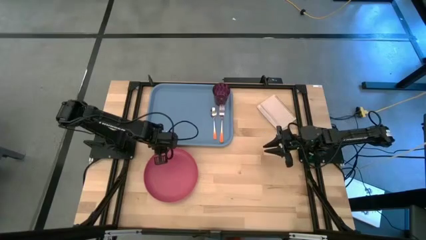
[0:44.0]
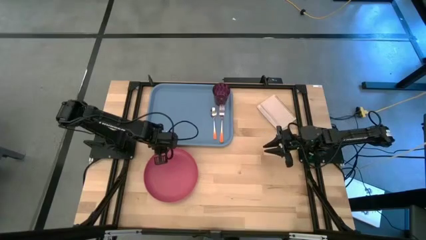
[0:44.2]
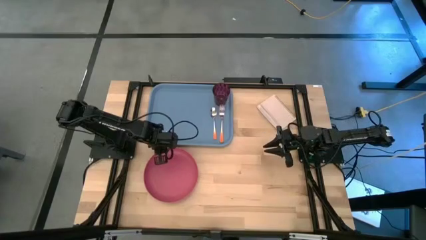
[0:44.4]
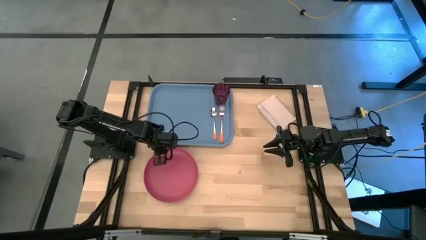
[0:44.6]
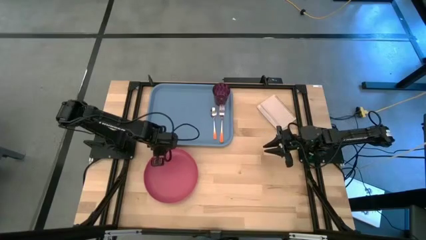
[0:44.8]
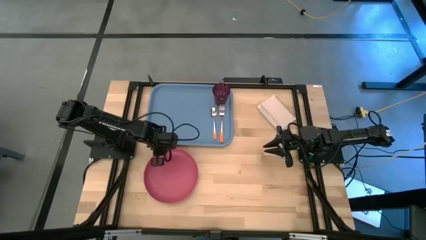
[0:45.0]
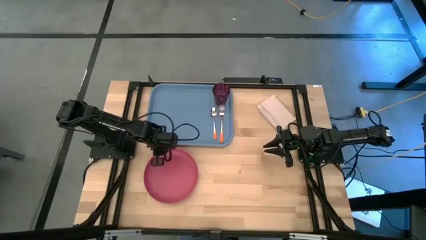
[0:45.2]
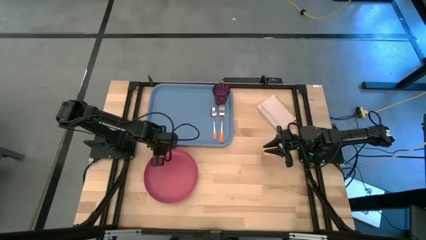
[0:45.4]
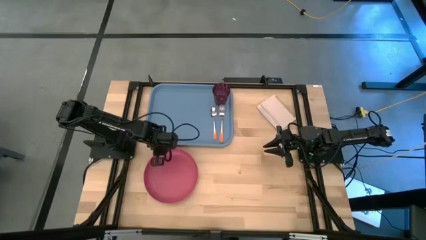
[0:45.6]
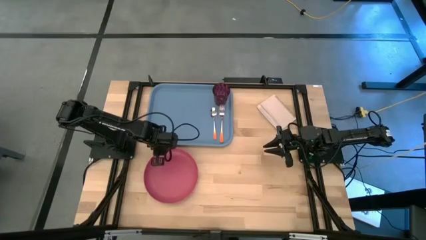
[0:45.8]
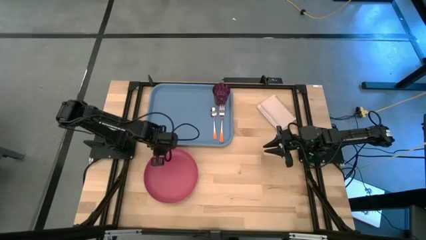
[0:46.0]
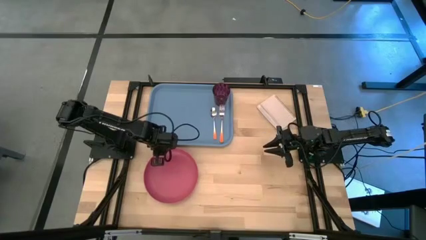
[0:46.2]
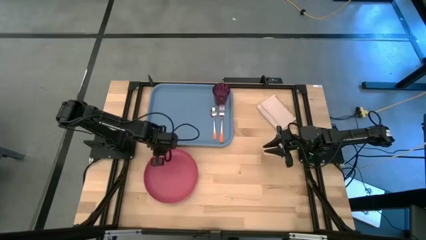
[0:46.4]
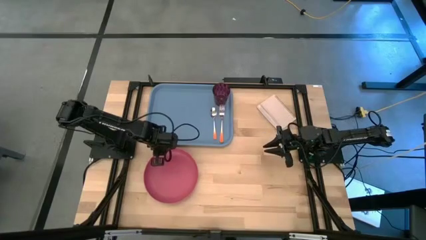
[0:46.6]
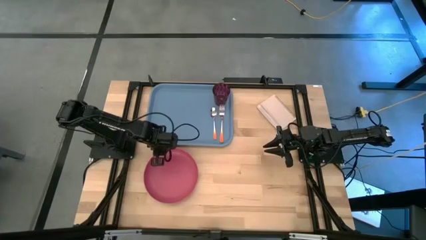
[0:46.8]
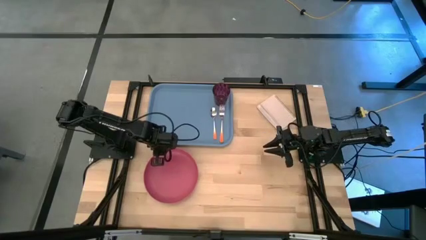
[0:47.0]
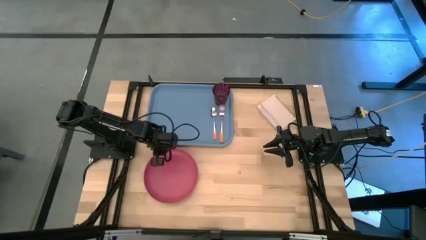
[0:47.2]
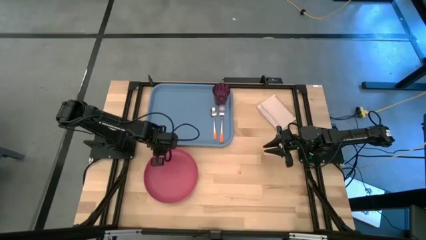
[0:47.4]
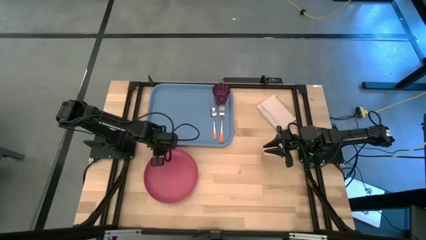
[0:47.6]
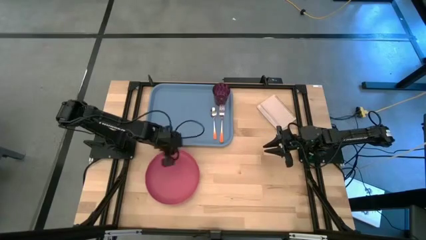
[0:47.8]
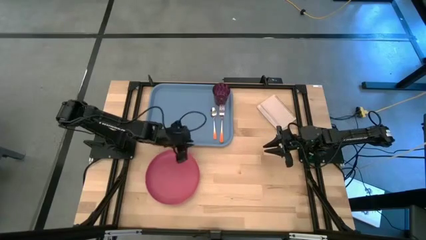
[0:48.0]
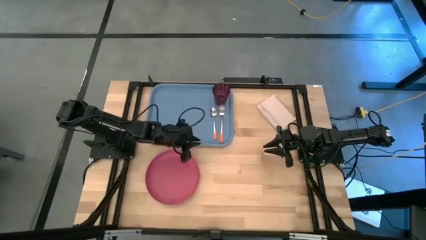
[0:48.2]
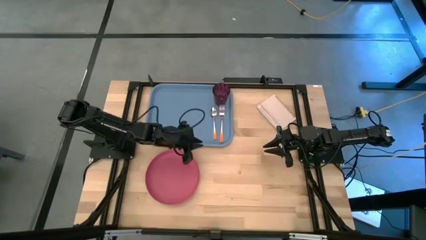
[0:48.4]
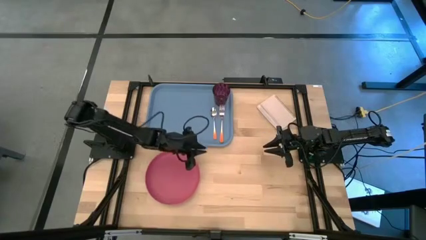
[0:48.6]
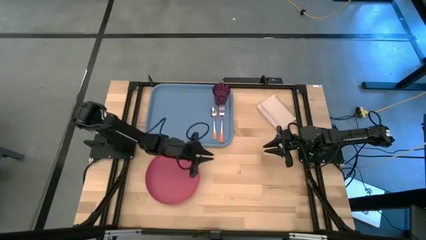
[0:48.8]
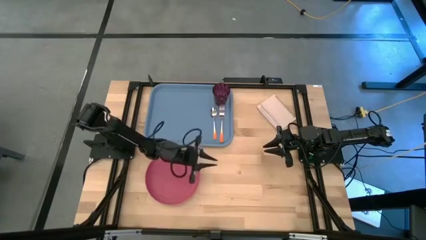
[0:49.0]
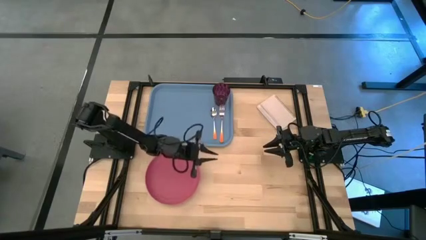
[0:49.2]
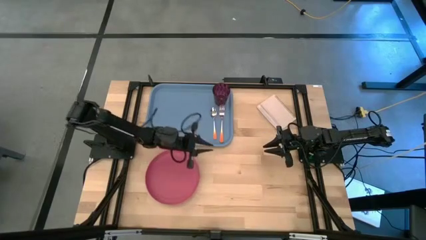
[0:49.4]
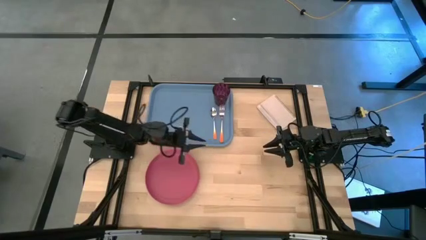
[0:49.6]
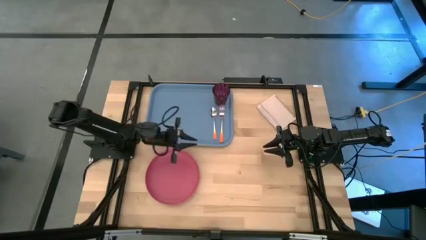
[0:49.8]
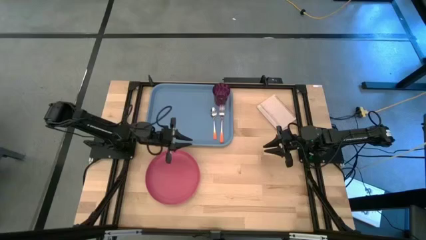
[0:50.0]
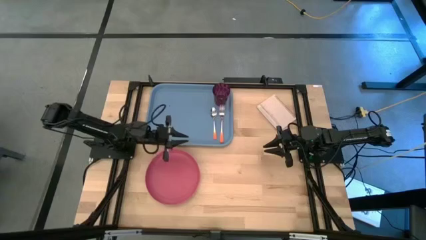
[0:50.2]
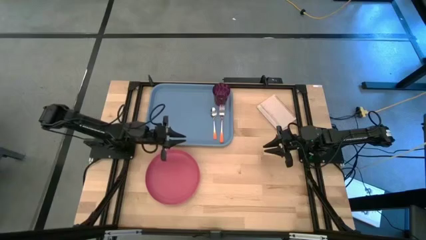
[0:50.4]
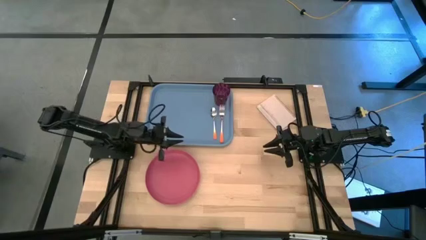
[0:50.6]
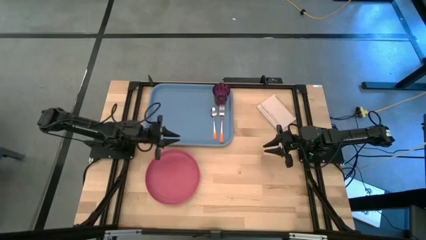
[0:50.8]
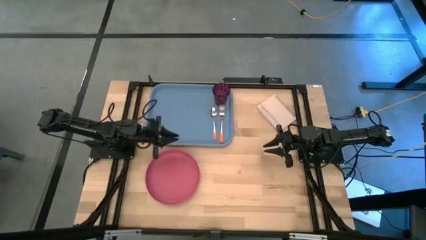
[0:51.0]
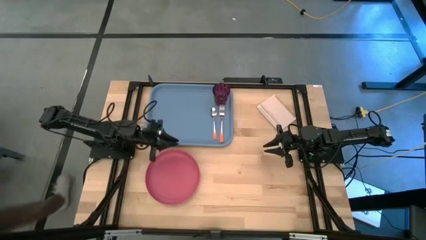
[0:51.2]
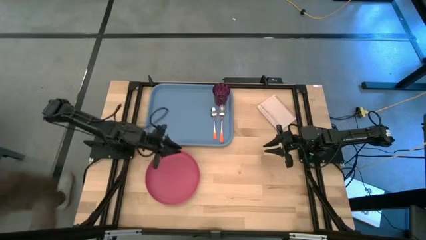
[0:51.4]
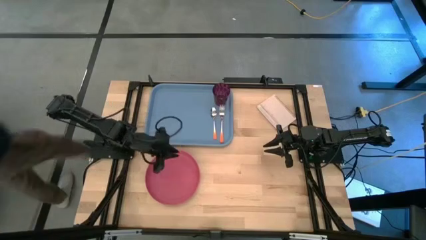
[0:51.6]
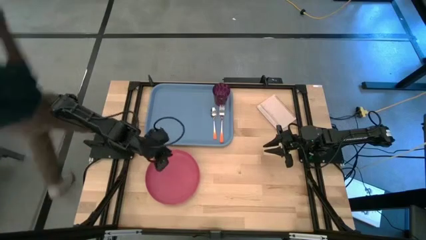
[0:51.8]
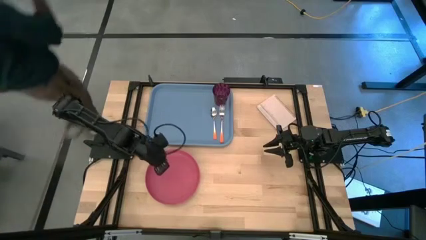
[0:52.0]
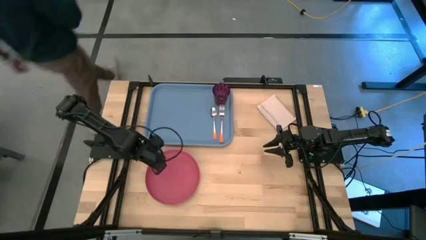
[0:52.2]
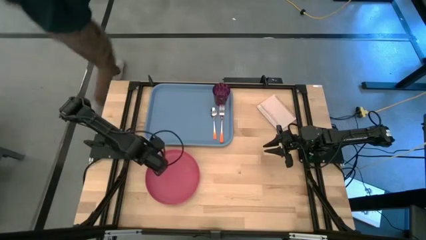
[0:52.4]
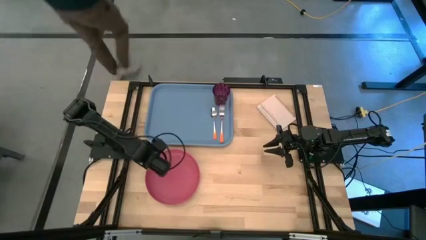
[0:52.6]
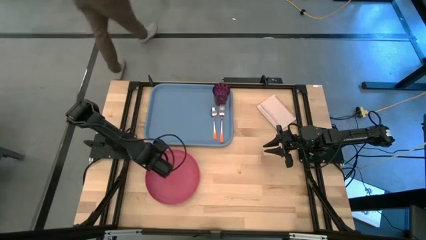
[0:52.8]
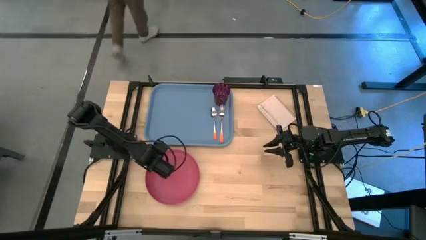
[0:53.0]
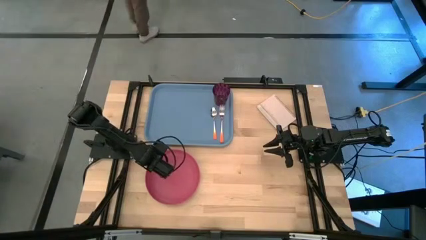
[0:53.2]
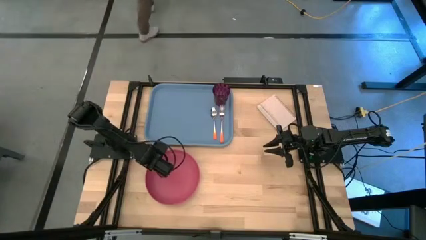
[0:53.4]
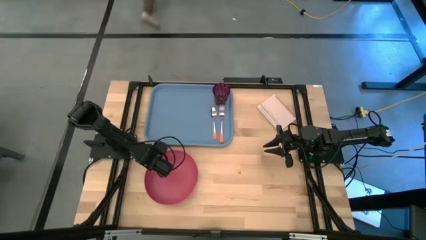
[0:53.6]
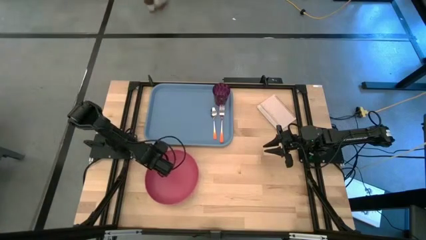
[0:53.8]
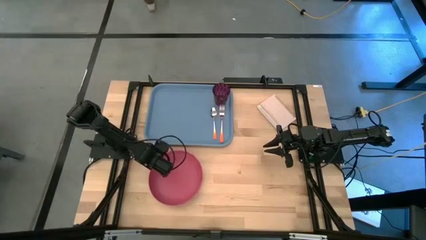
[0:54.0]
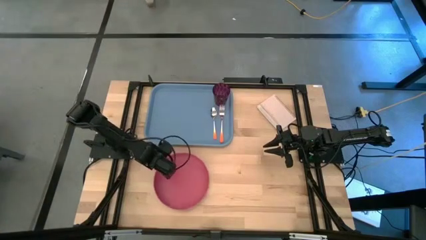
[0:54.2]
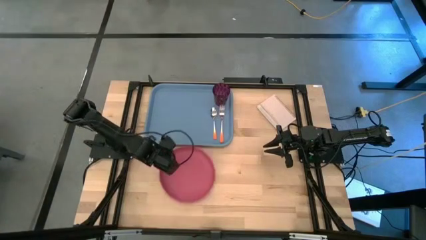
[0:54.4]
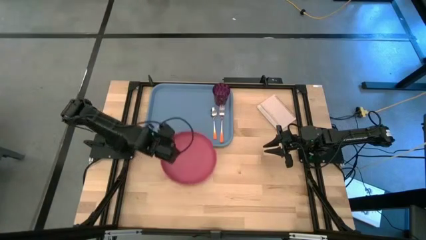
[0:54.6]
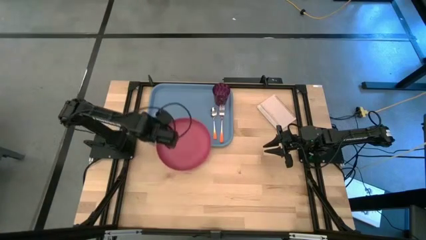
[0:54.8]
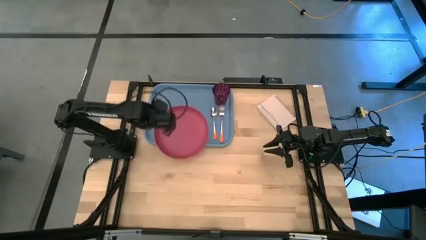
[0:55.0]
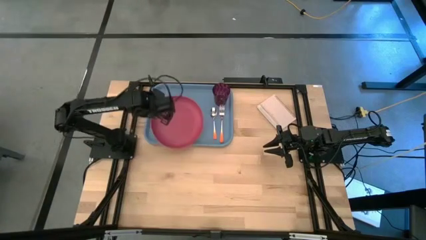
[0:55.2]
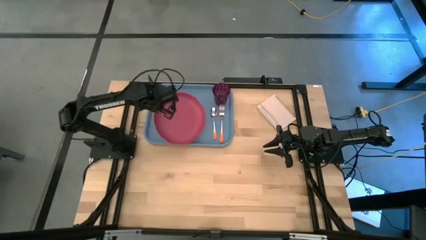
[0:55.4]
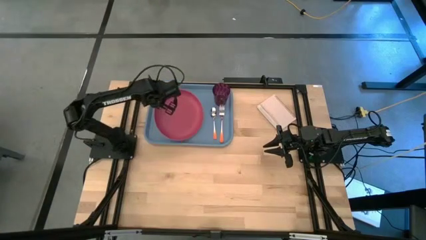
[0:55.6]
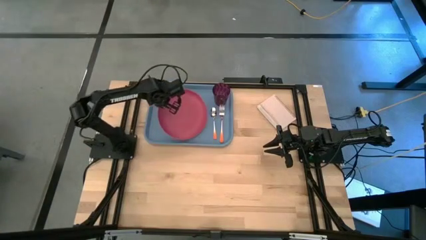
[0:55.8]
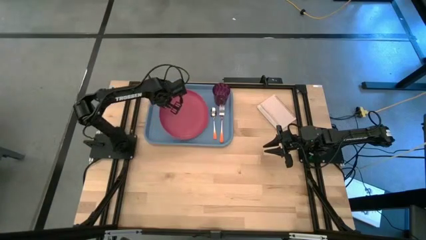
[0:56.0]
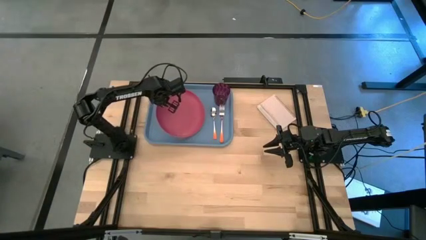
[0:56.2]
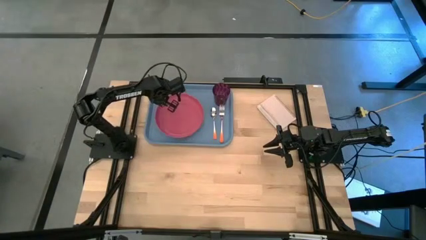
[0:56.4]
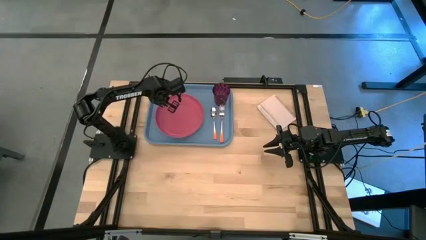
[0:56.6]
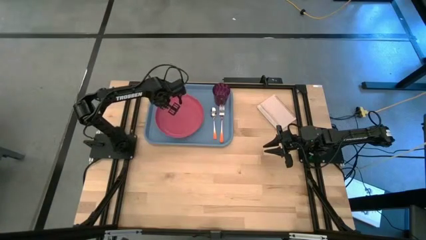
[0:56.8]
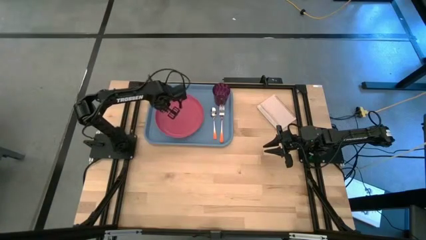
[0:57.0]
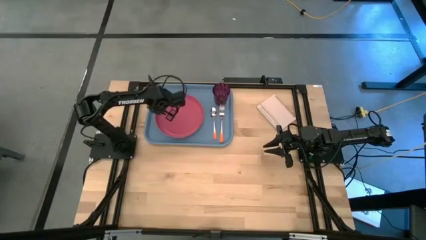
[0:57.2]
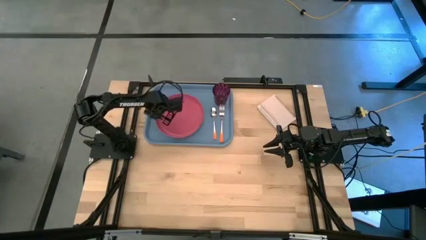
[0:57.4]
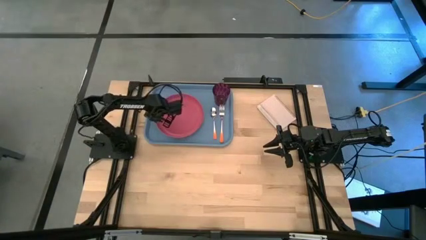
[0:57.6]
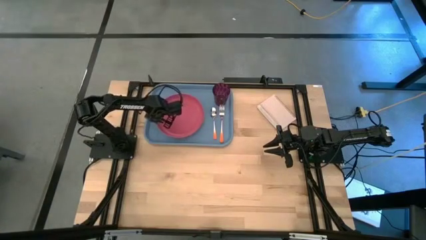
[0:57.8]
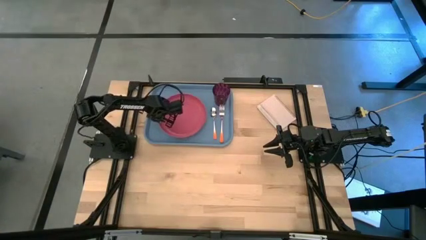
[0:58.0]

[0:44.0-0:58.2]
Task: Pick and place plate/cup/fork/spoon on tray
Put the pink plate on the blue tray
